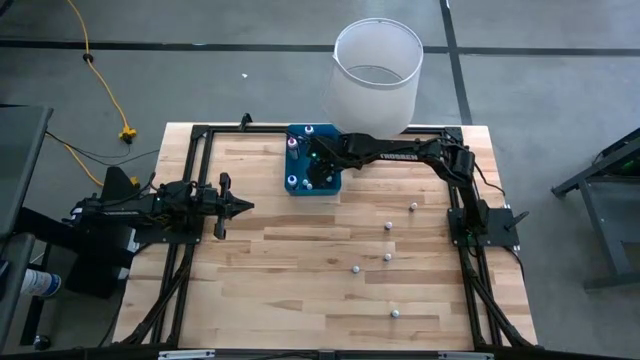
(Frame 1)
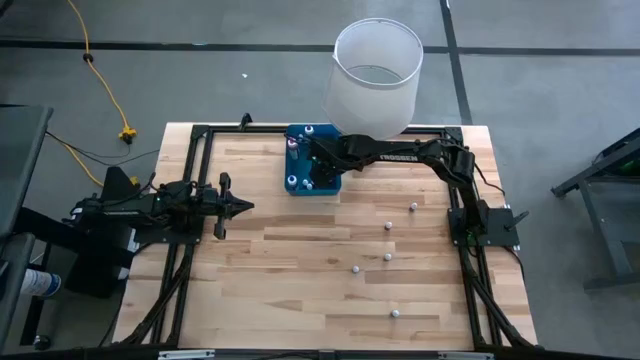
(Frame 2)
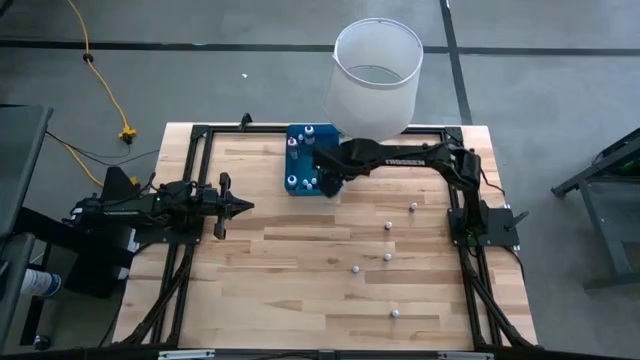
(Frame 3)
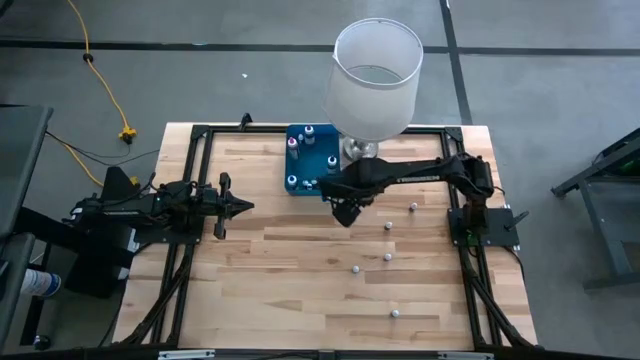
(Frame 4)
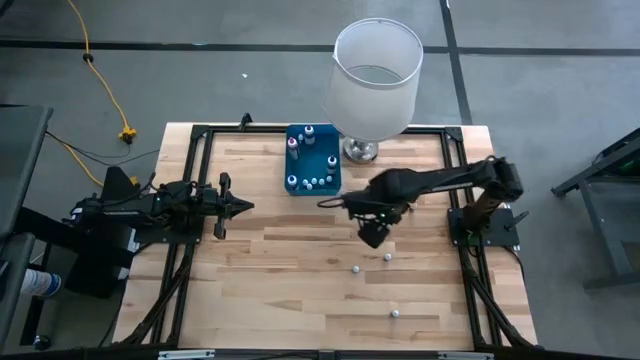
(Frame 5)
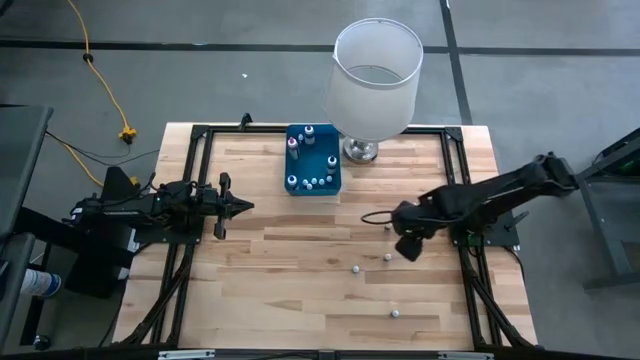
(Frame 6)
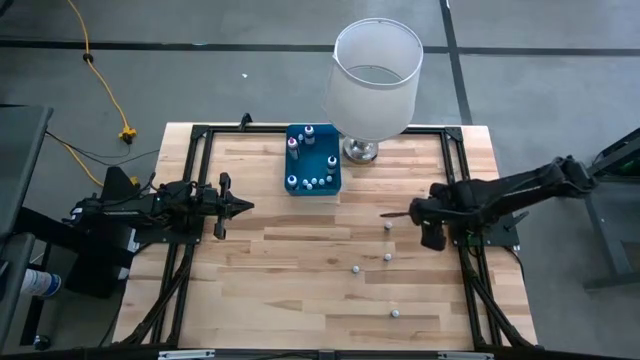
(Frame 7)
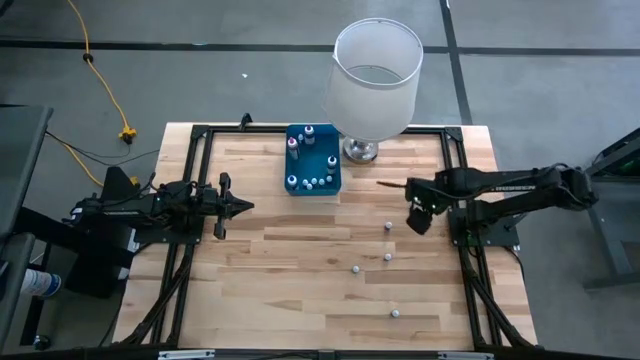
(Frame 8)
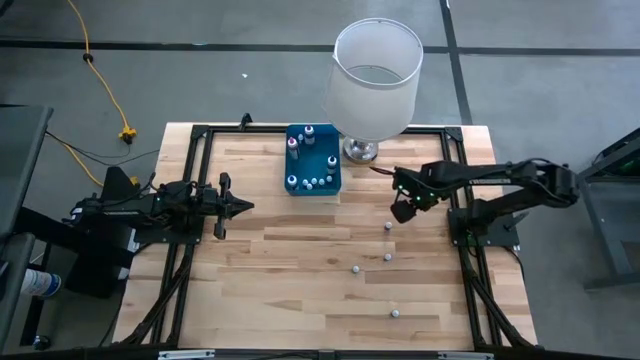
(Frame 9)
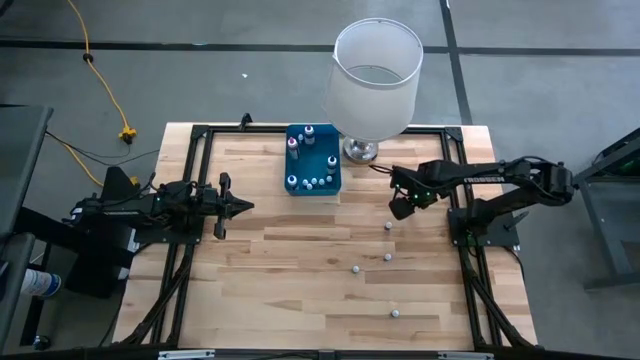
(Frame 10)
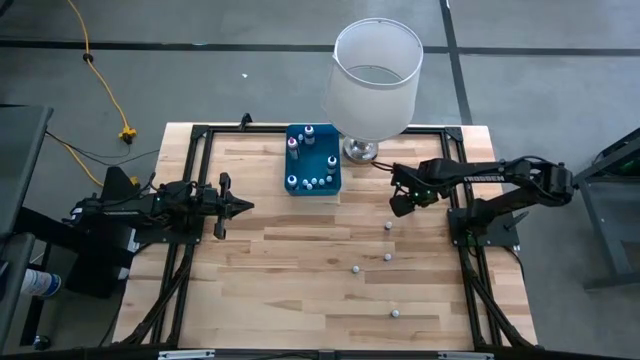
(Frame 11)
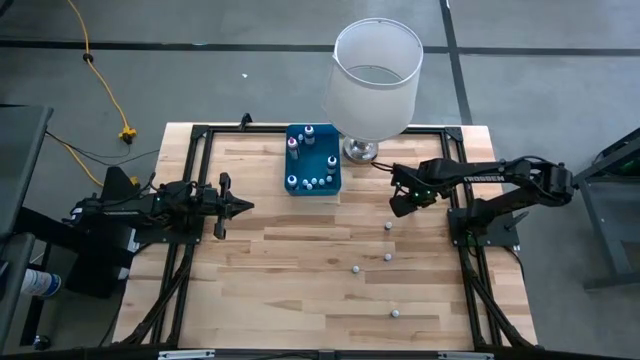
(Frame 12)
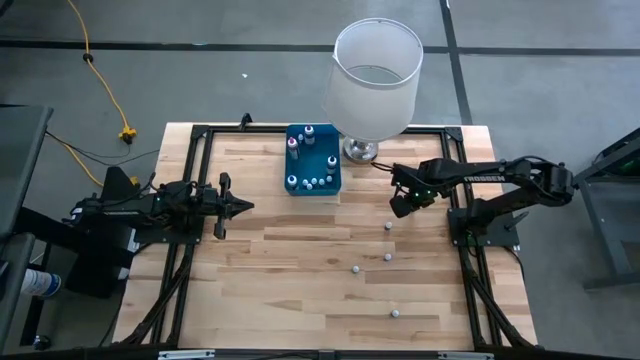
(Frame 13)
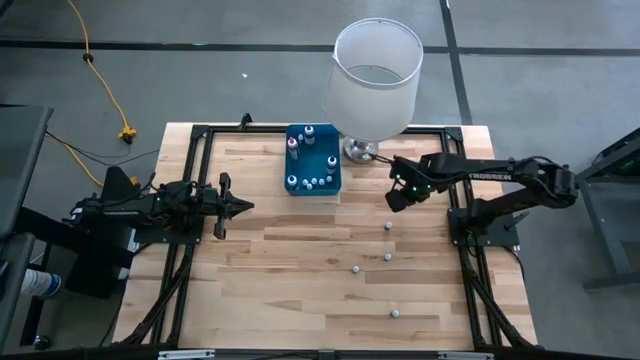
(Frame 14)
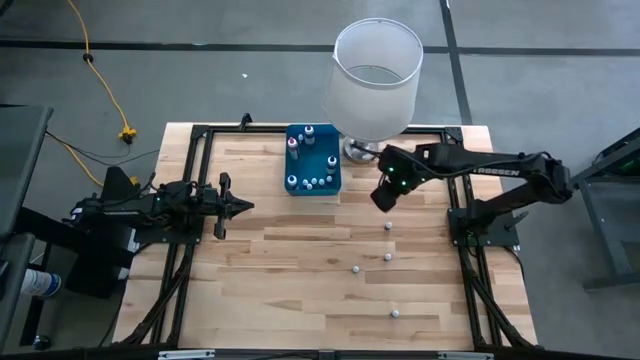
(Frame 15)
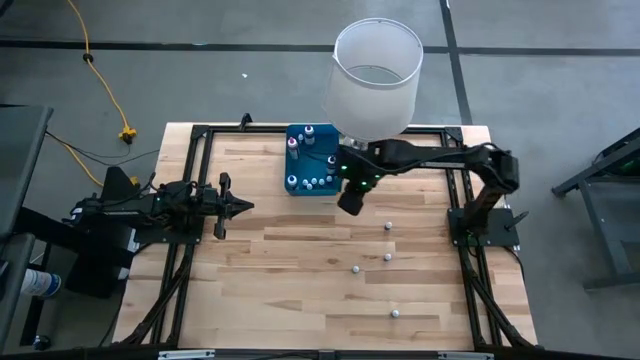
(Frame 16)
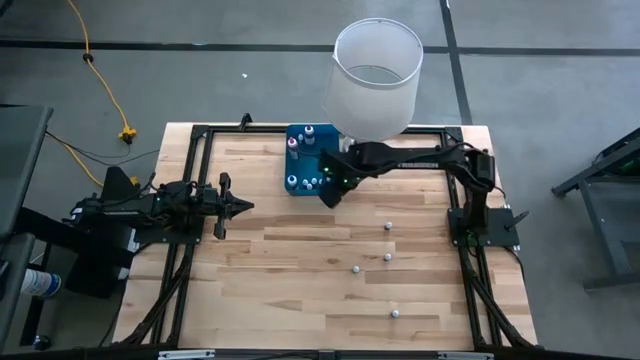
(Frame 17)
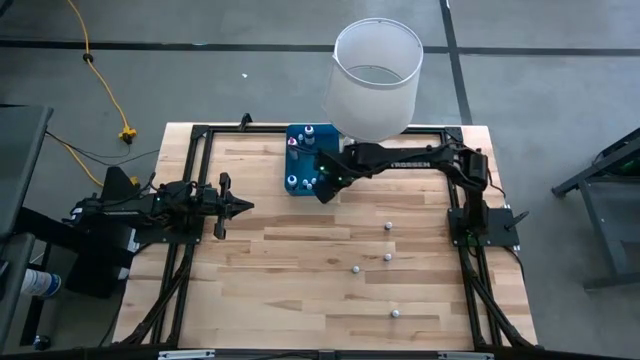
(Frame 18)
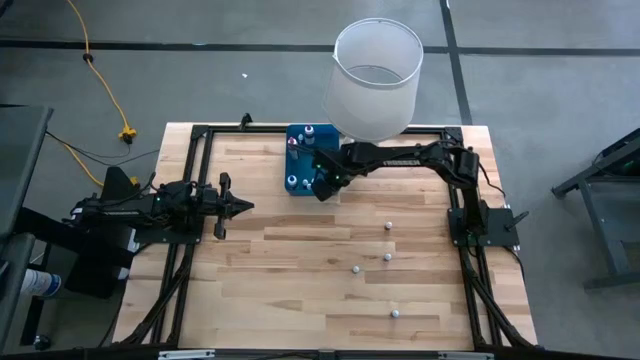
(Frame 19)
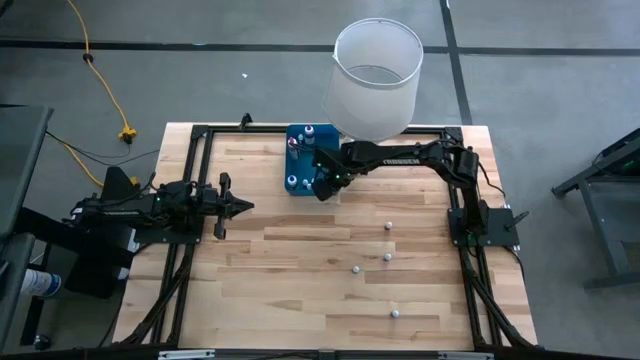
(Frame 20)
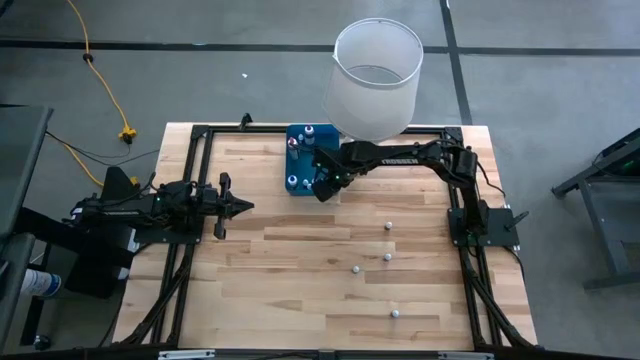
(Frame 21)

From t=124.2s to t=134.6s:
Task: Pick & Place food coloring
Put the small red food coloring bottle into the blue bin

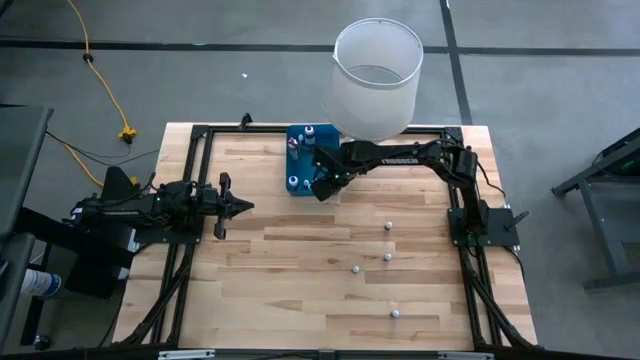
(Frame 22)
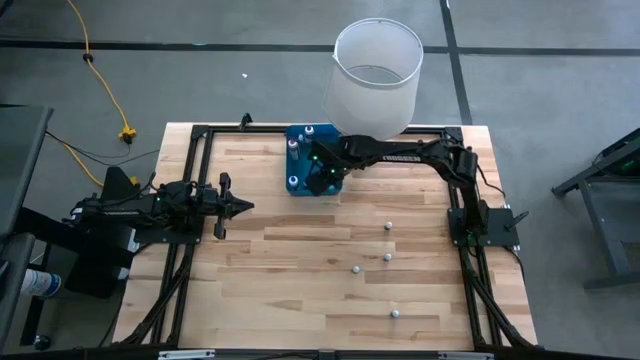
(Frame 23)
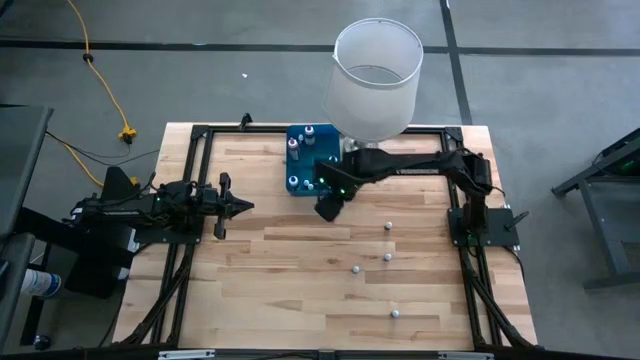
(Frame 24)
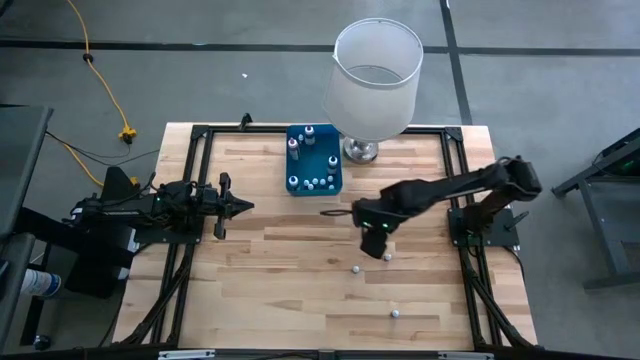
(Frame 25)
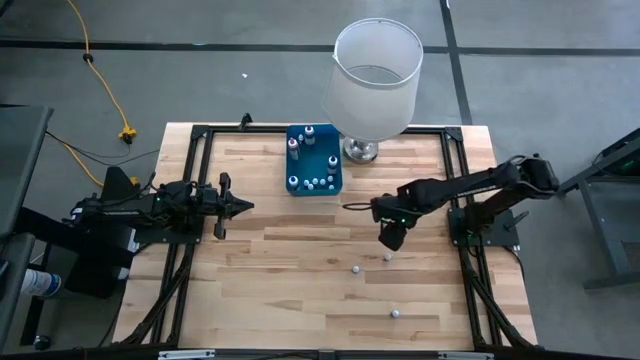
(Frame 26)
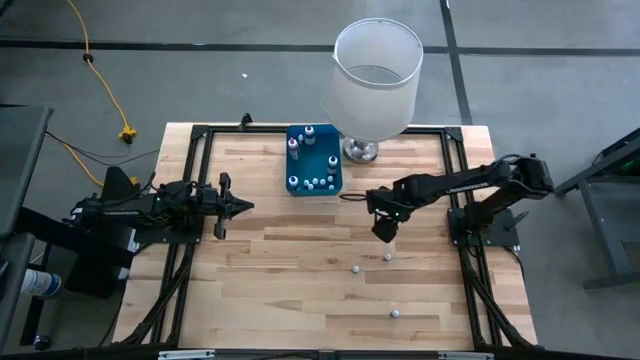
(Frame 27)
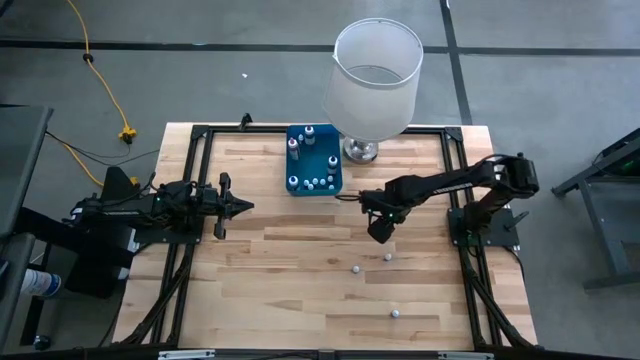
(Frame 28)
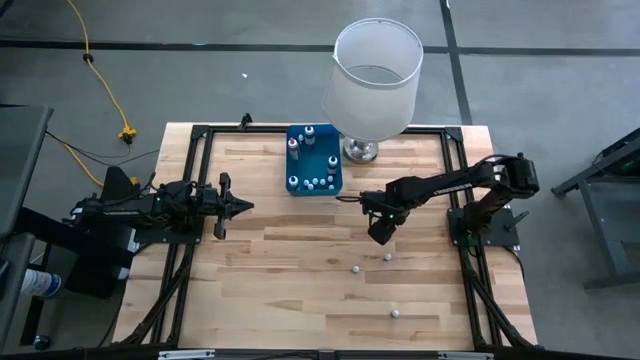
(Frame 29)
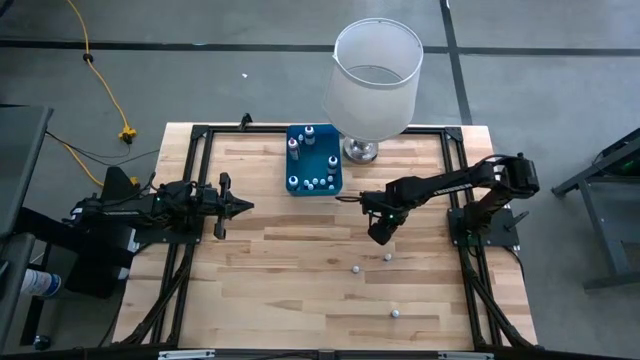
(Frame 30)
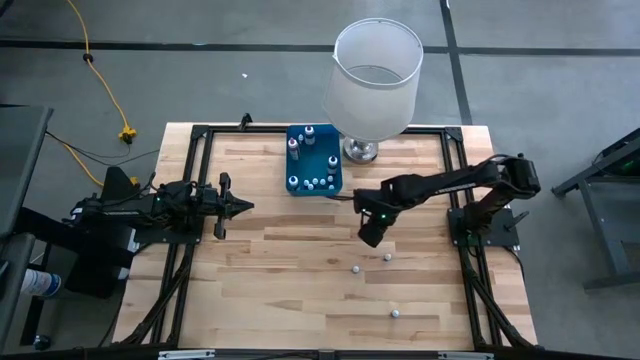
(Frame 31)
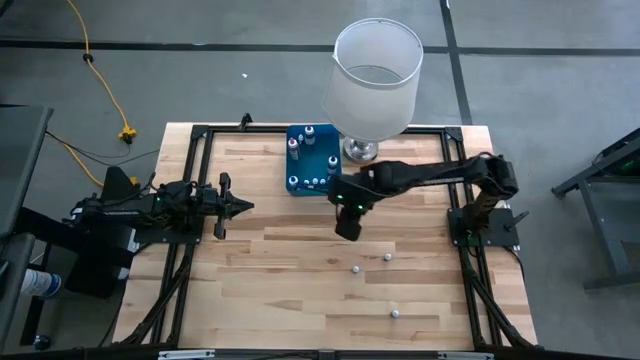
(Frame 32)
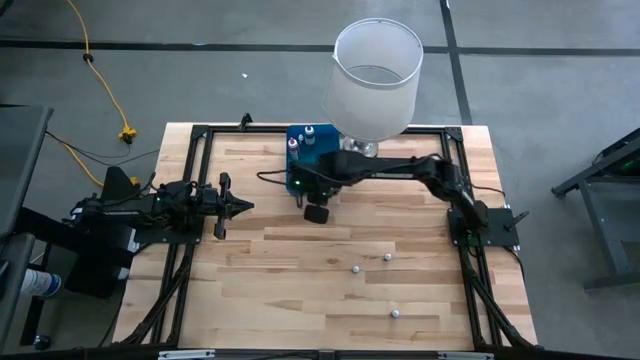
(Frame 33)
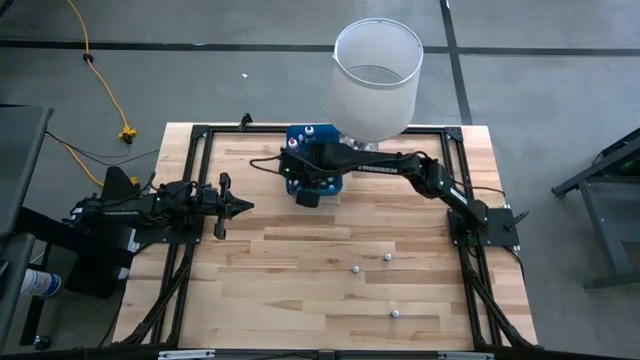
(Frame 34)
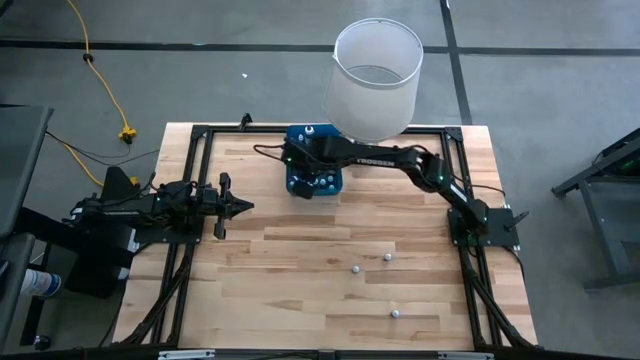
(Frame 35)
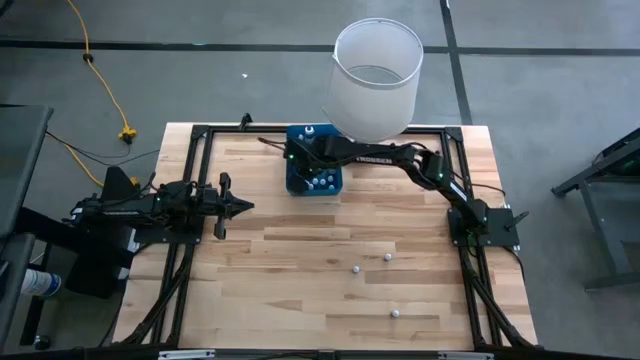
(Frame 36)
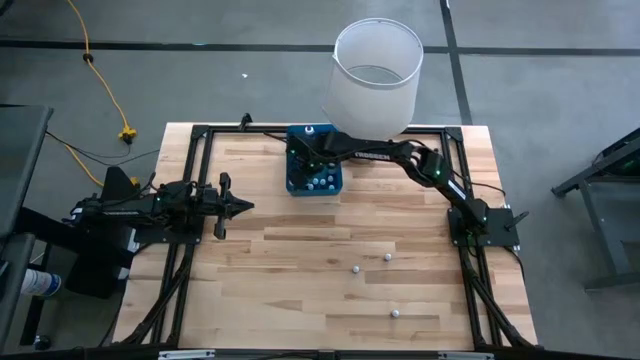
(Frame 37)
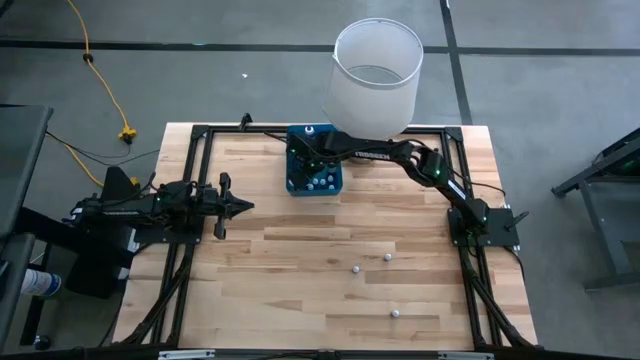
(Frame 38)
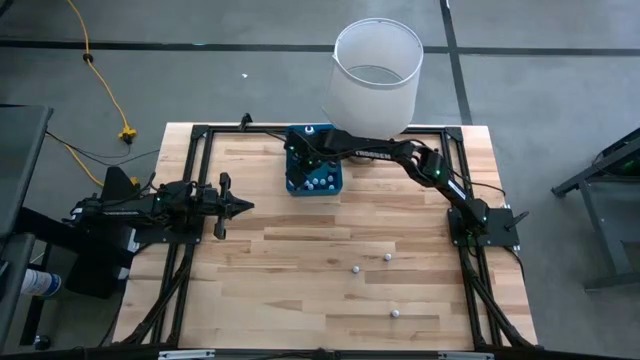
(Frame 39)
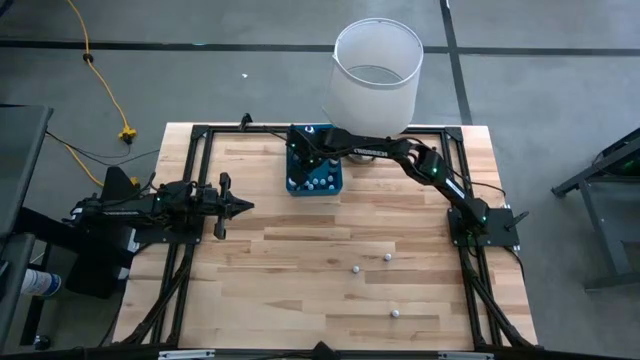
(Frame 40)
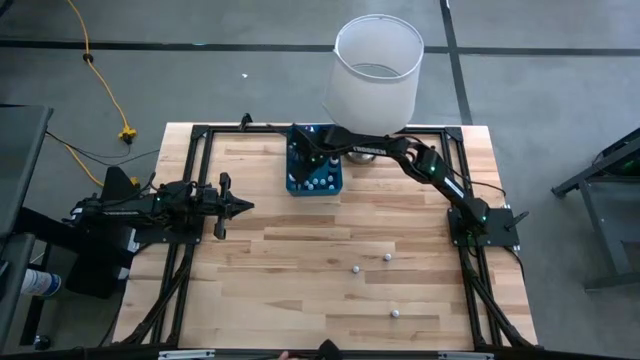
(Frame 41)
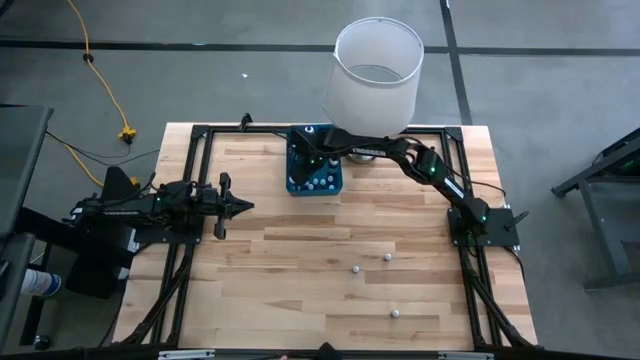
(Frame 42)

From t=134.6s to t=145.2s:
Put the top small black food coloring bottle on the top into the blue bin
